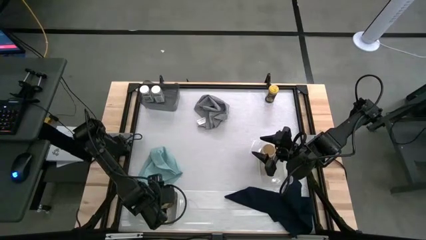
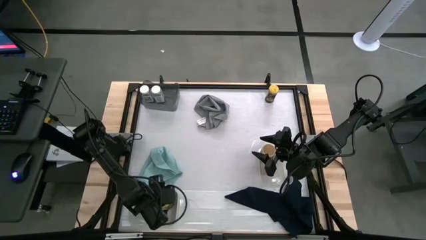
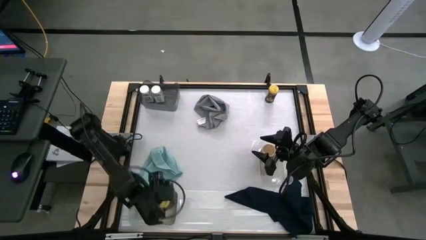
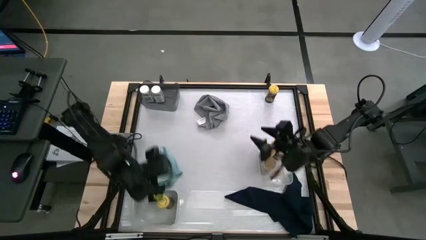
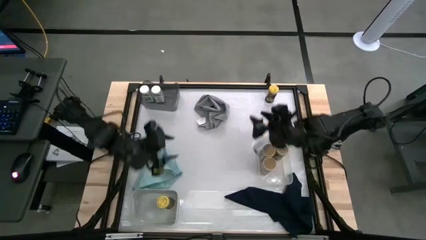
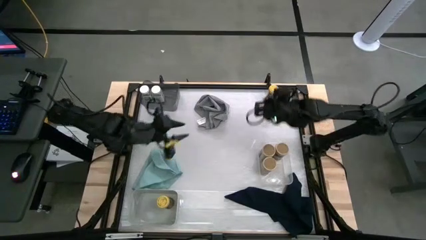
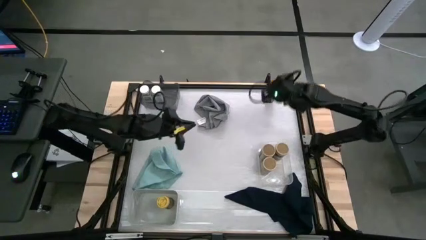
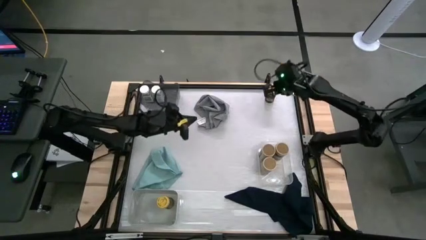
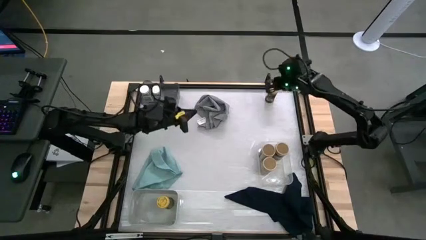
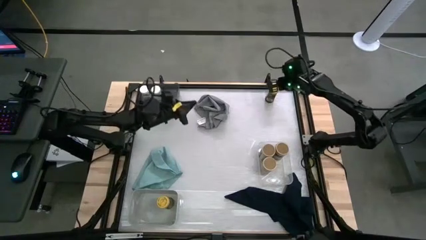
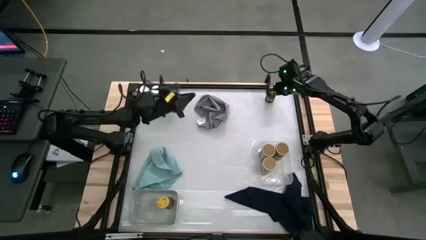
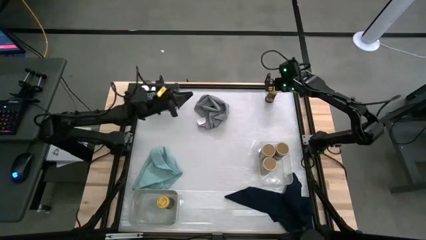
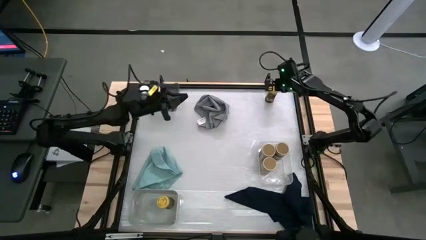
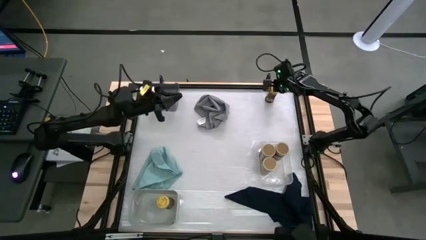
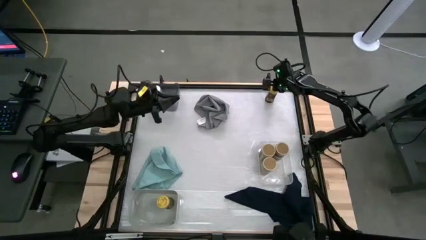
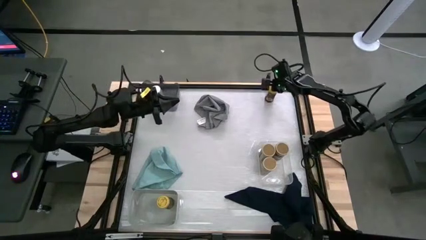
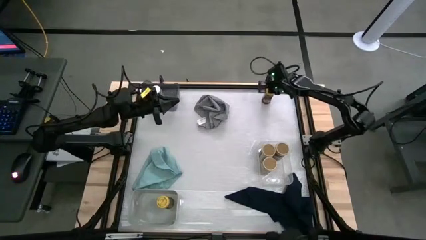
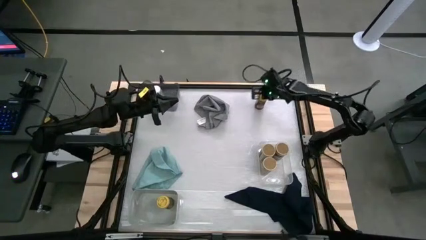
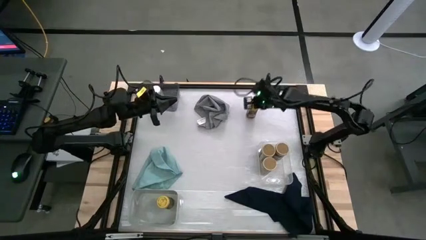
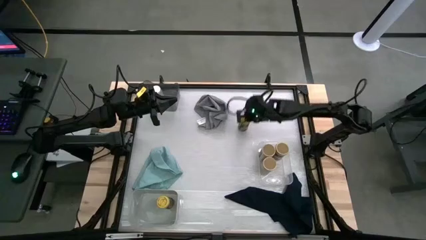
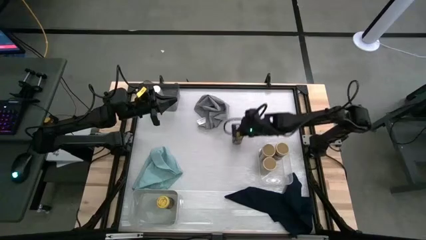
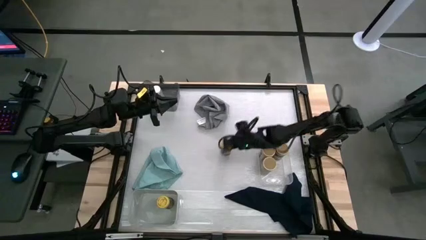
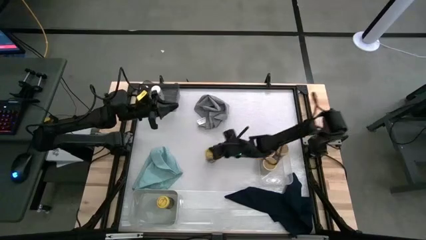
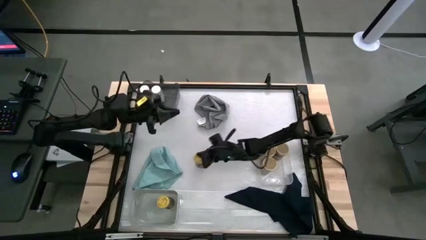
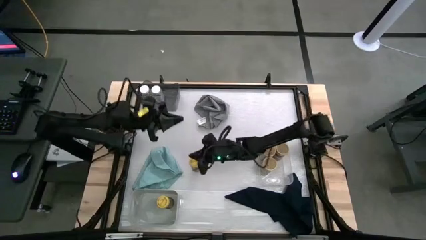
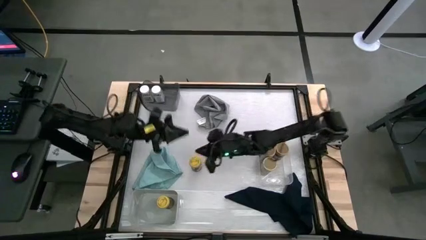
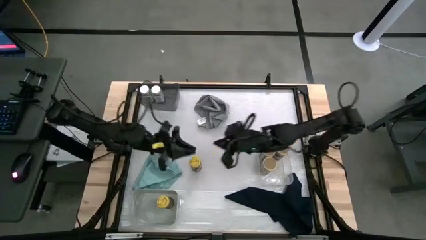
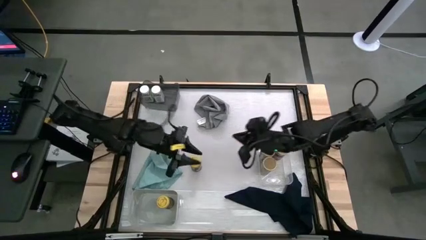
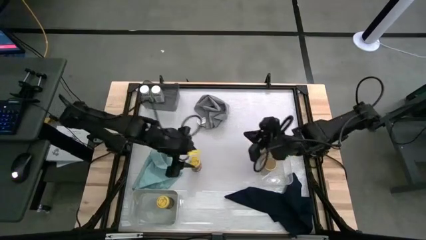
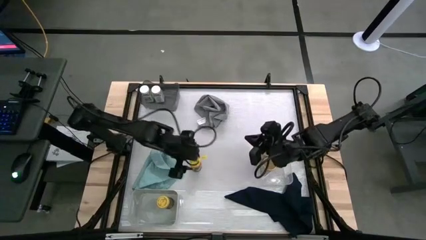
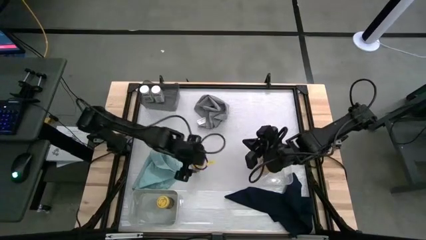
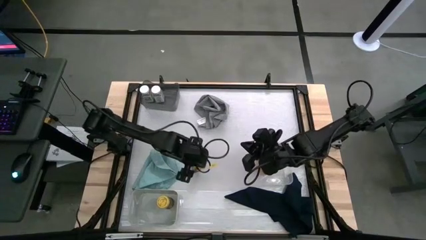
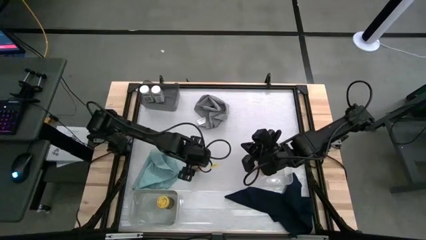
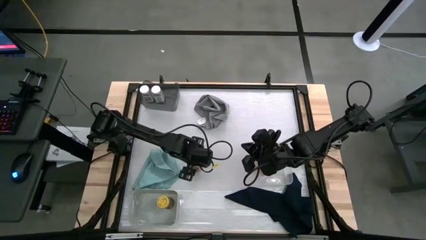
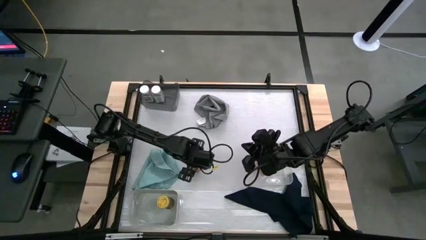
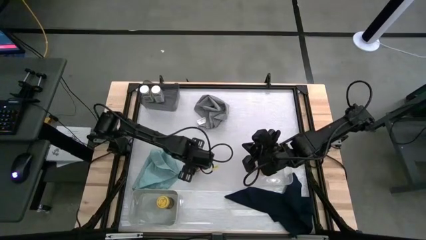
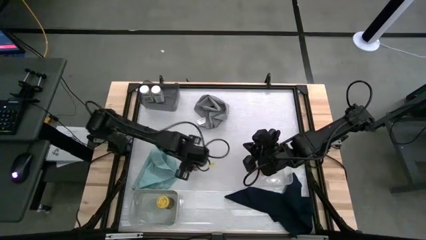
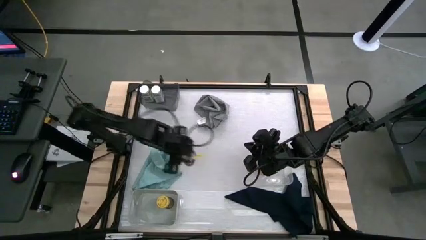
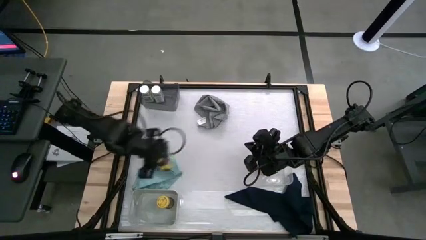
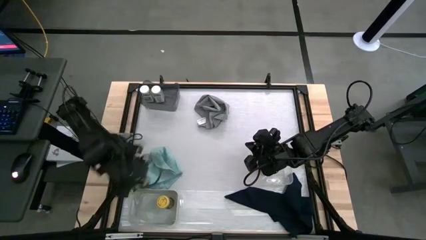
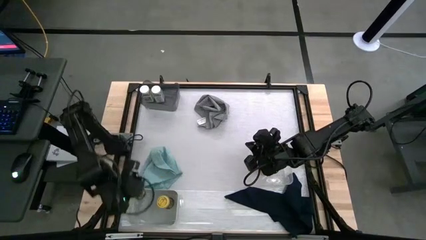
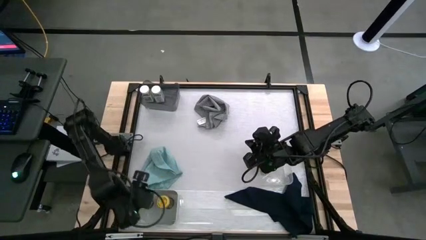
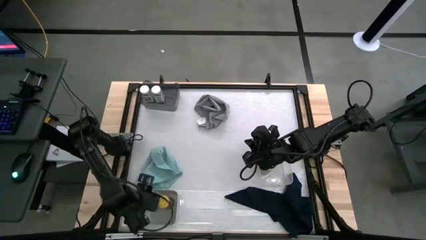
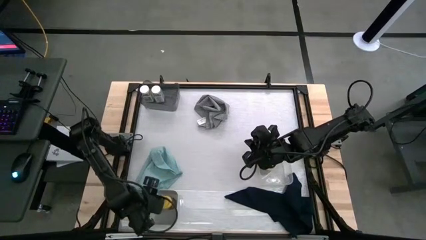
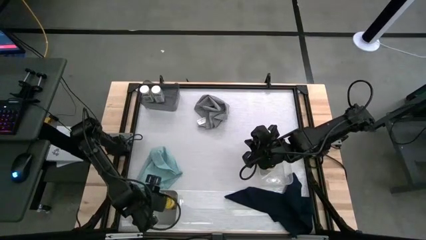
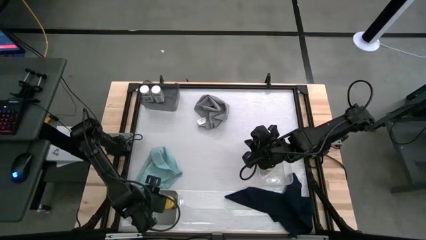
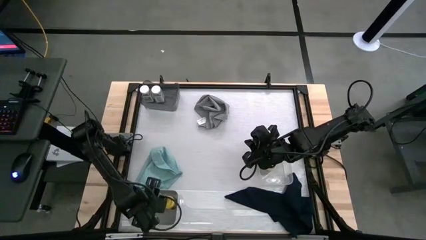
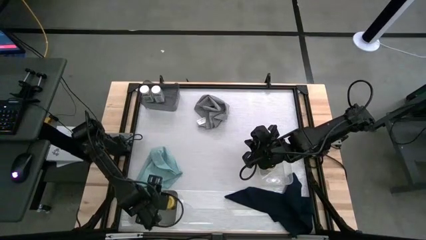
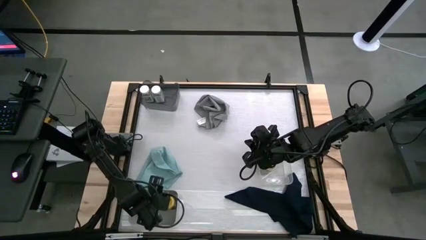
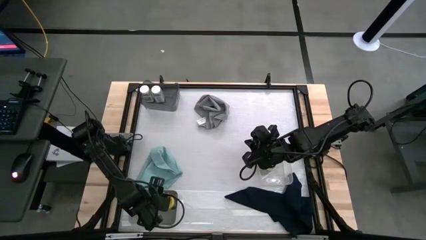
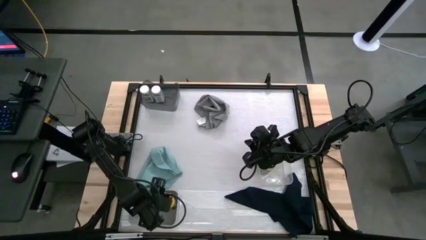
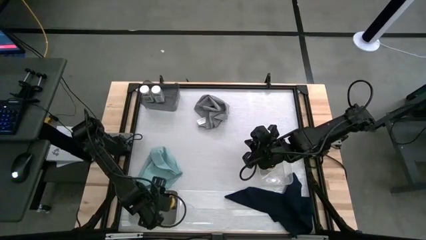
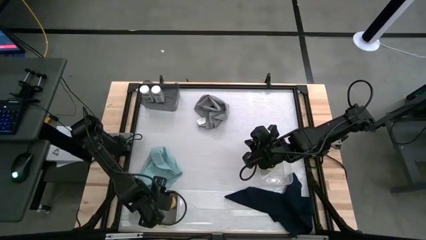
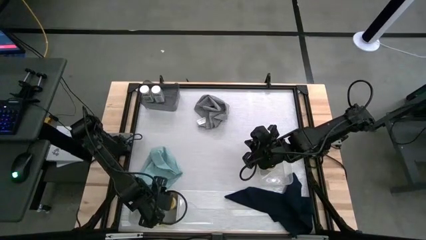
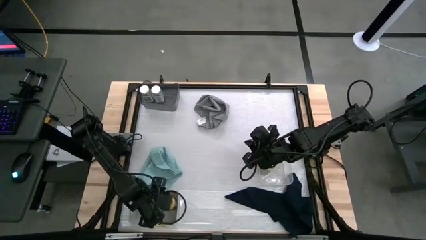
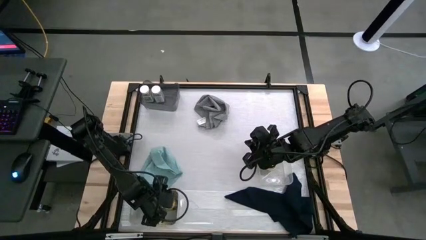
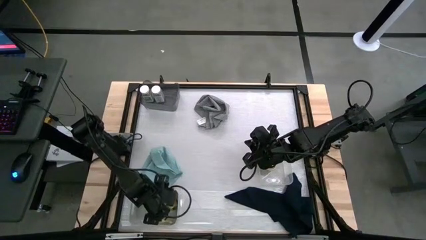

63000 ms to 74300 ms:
Task: Sort spices by type
Put the yellow seasoning bottle into the gray bin

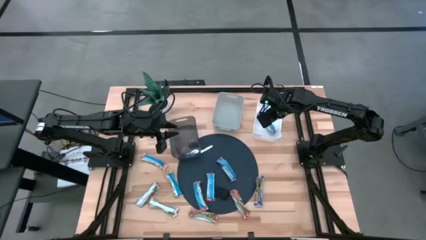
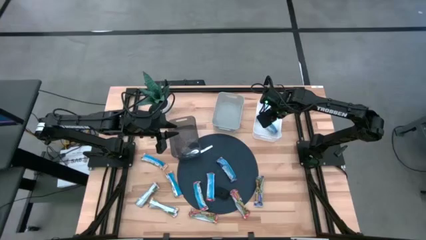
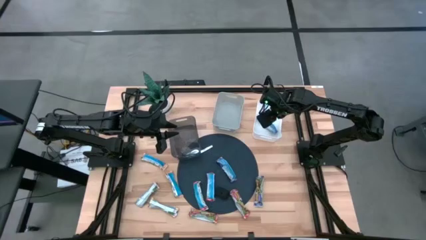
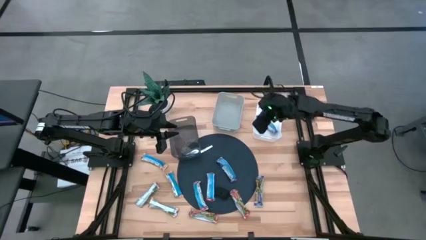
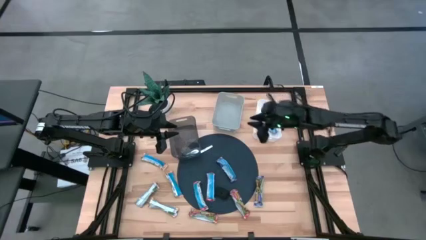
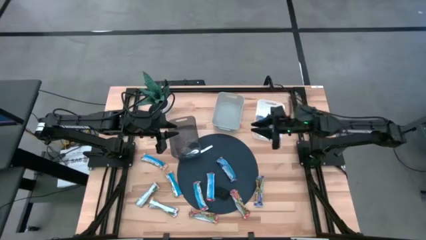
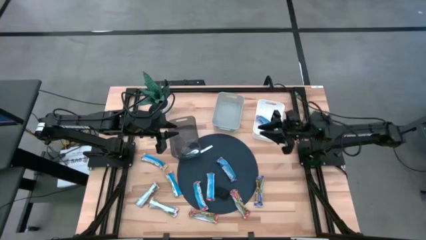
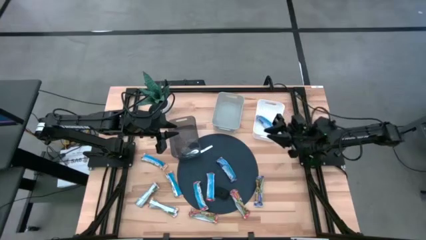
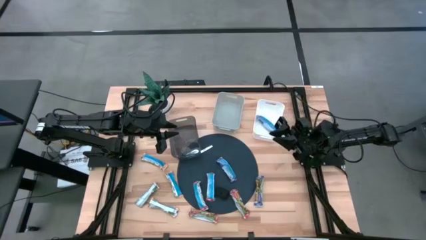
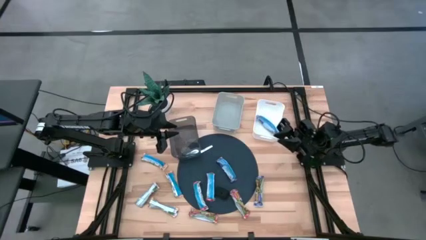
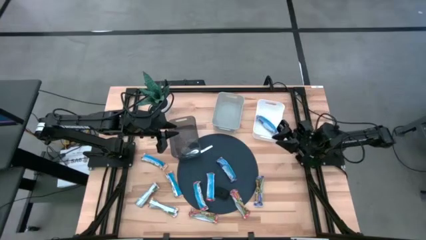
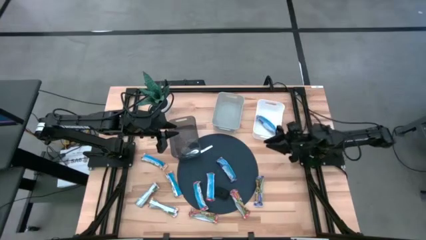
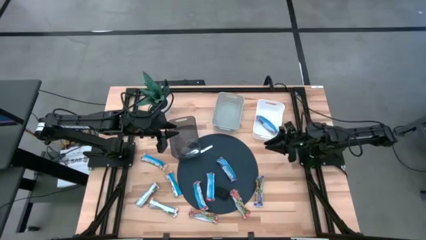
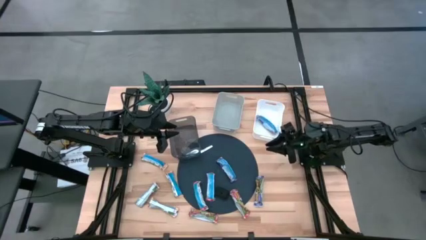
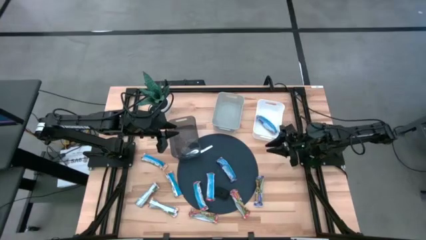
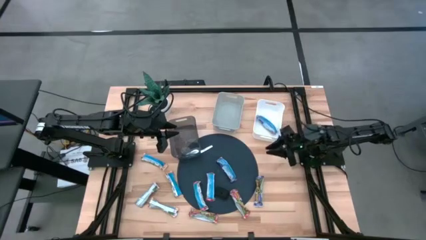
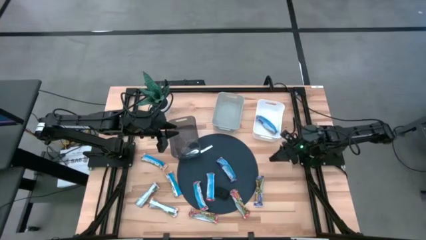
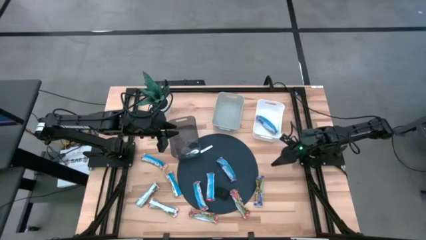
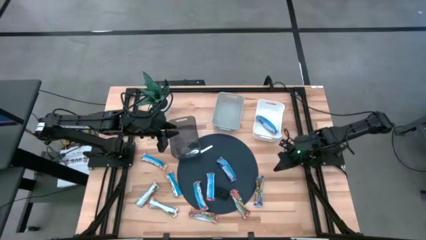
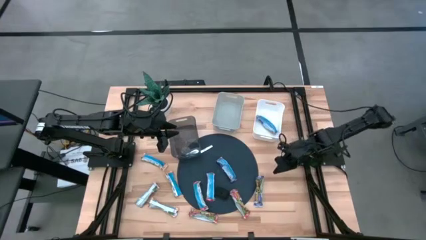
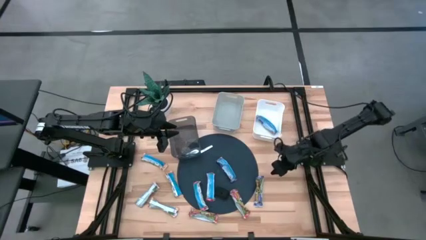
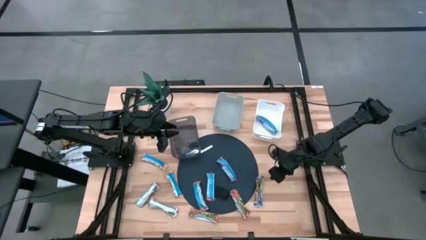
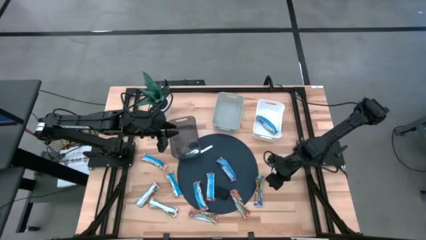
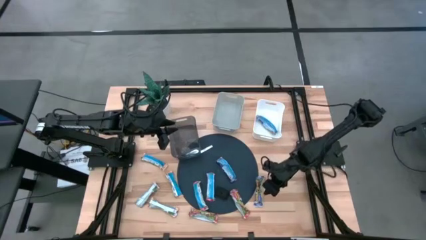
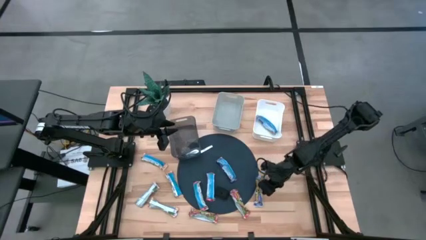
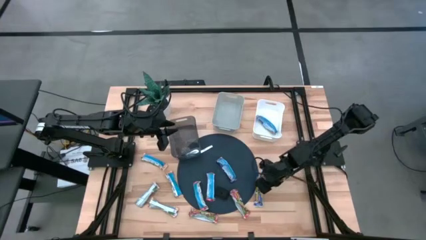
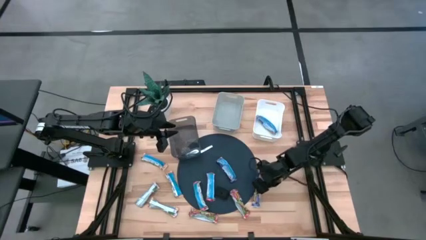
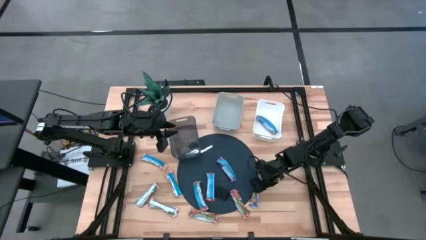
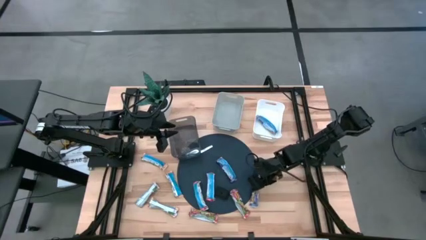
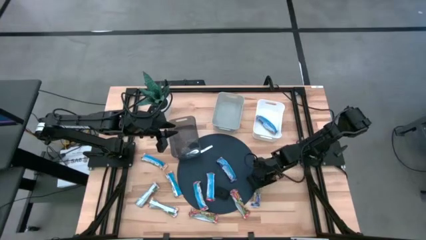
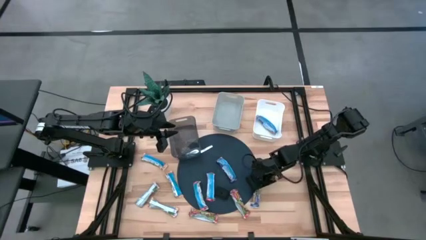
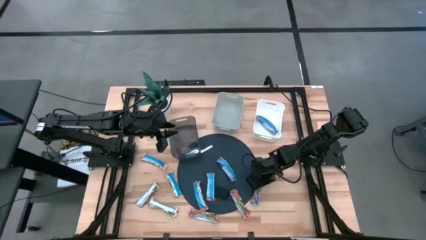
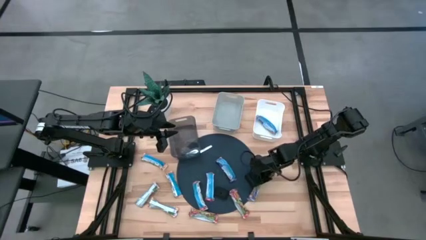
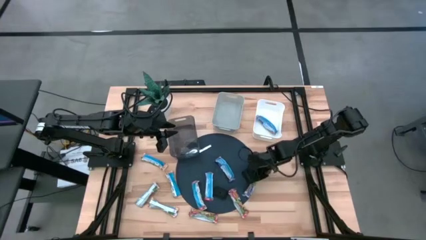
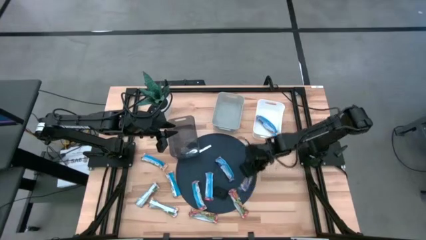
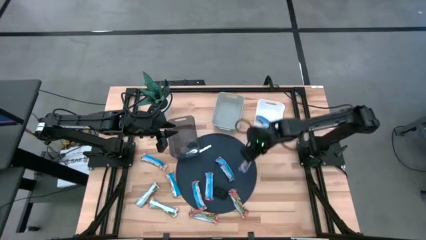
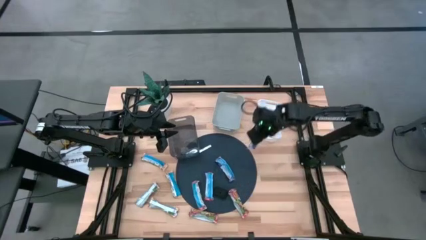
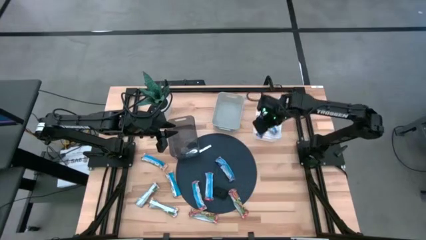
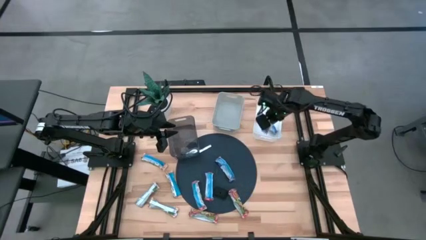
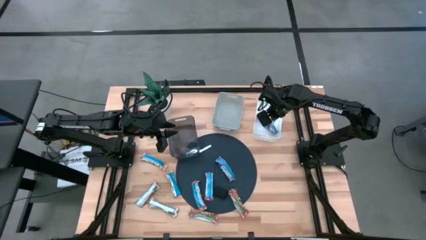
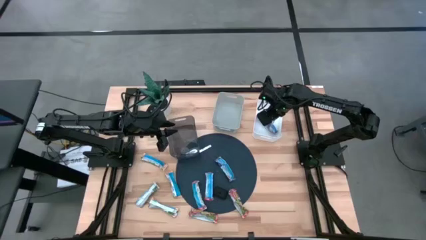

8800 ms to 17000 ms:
Task: Pick and place Granola Bars by type
Put the right blue granola bar into the white bin
